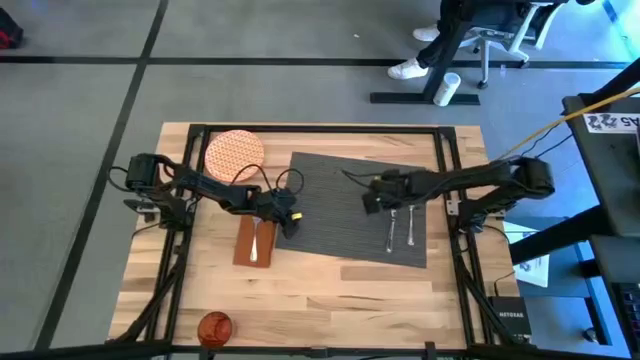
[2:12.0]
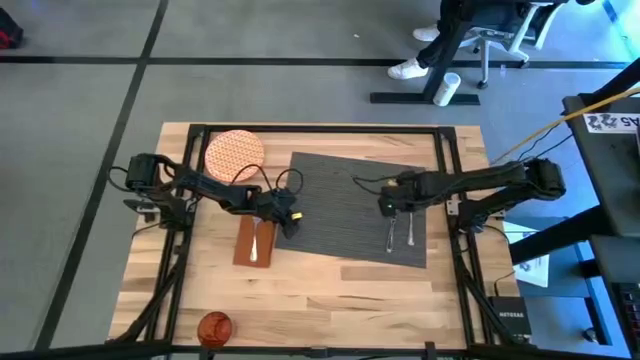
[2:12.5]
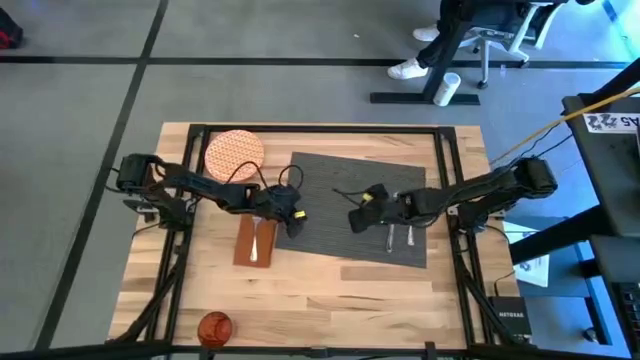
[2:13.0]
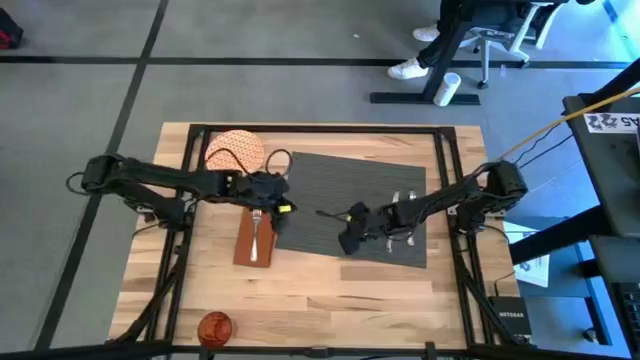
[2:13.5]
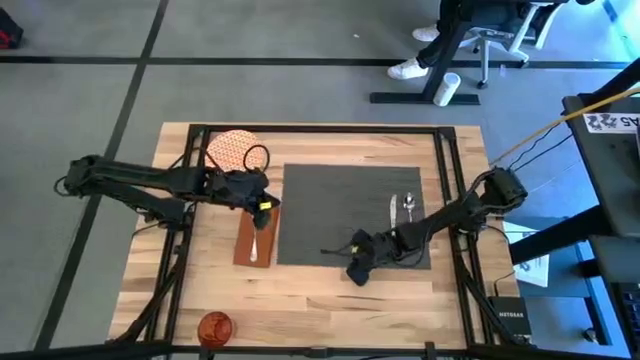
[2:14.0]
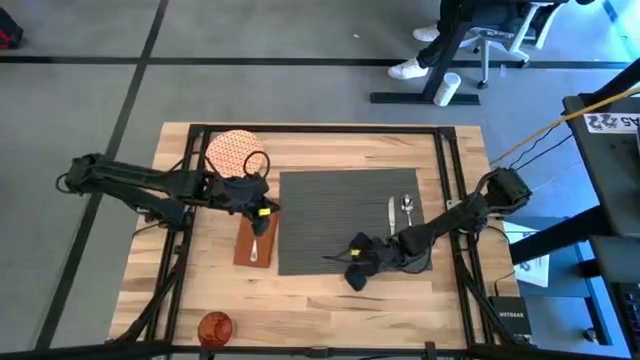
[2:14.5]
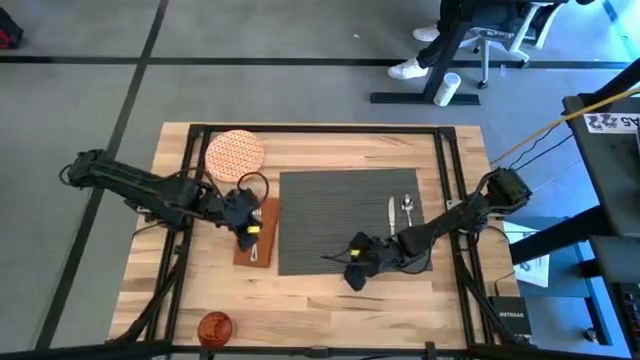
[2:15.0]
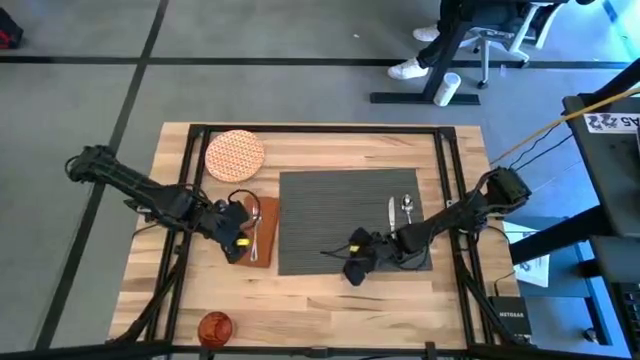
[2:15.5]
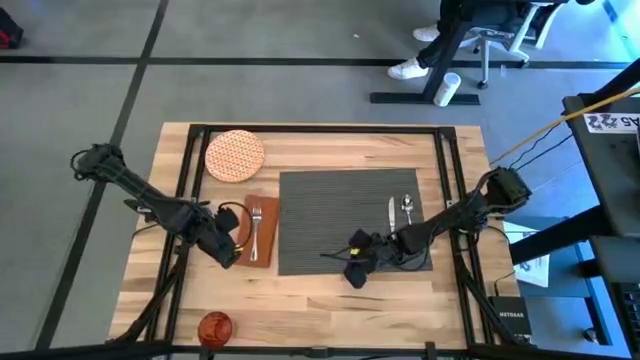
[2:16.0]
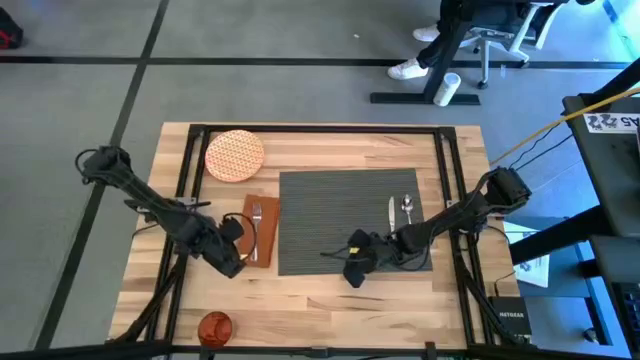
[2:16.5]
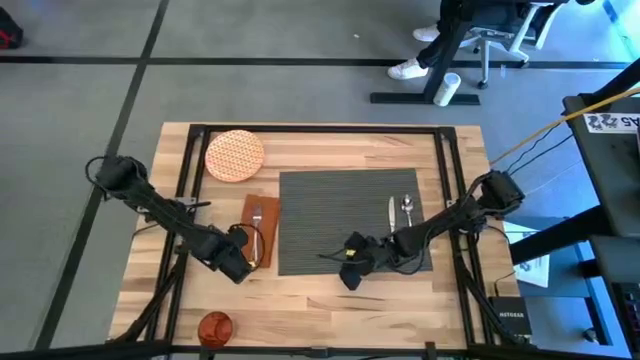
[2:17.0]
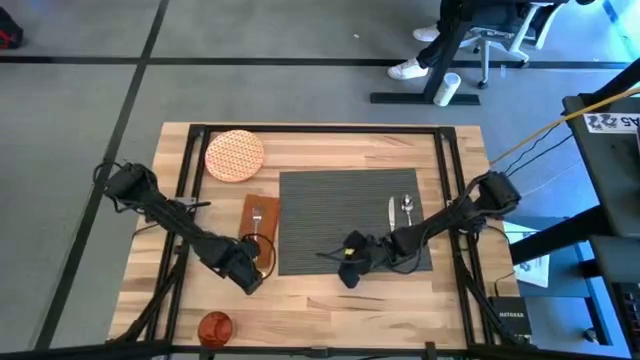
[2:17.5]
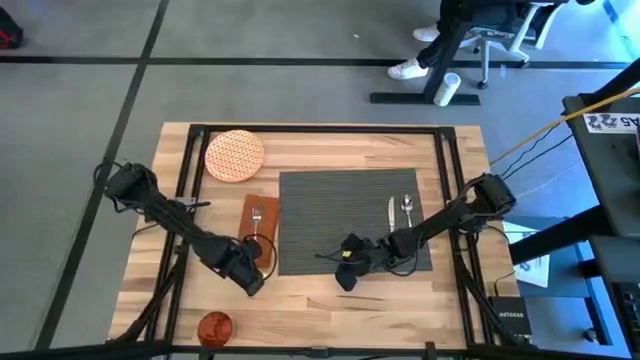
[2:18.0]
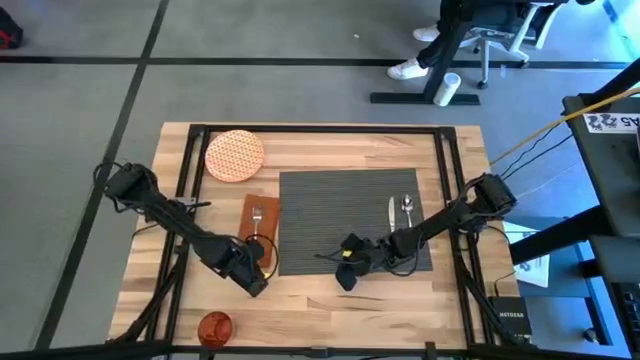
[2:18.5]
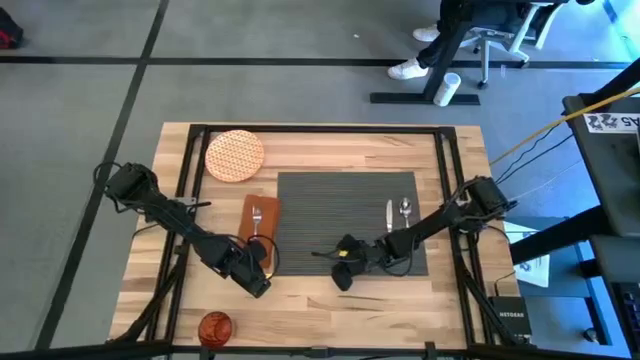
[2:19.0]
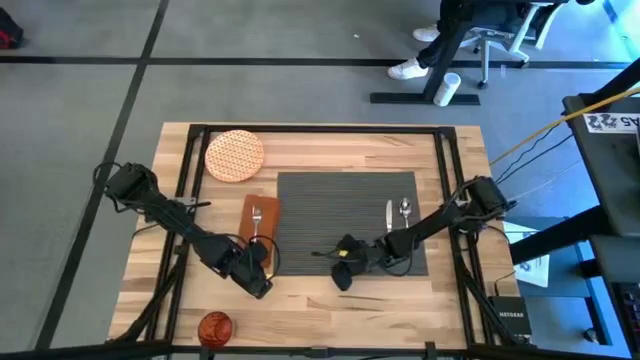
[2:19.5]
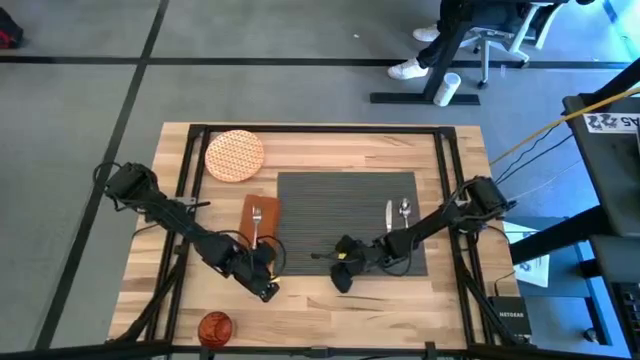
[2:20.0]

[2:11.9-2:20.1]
Task: Set table place
Adjust the gray tablemat

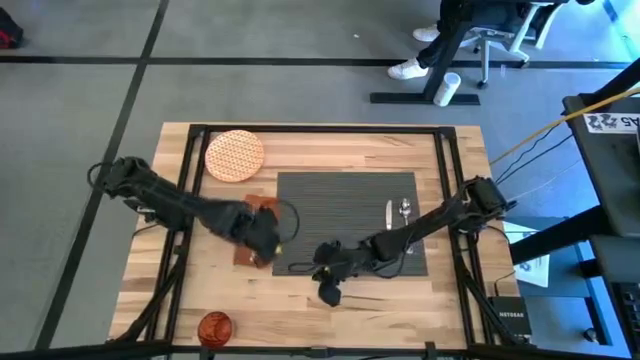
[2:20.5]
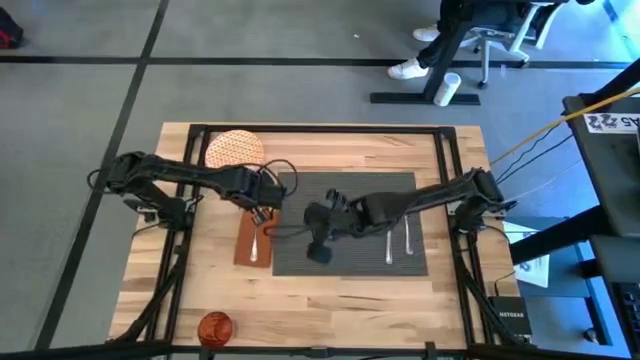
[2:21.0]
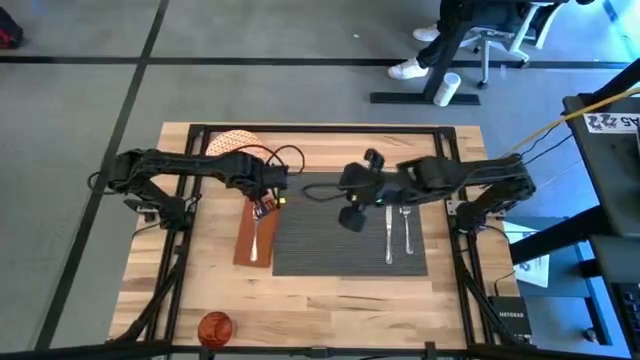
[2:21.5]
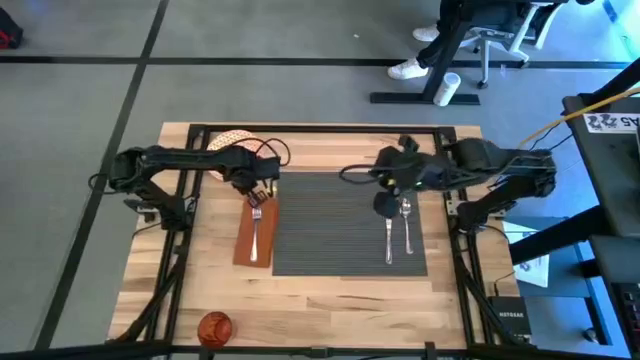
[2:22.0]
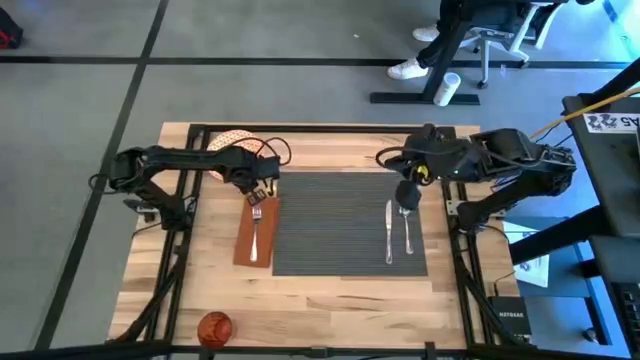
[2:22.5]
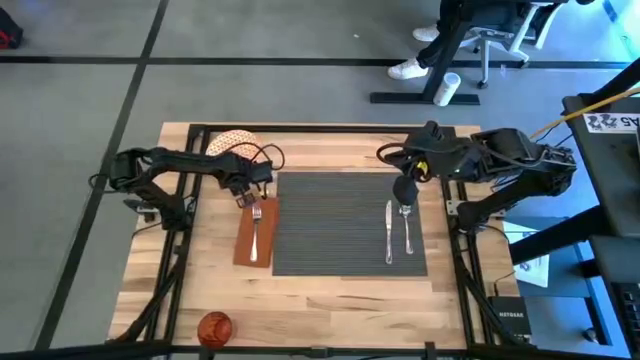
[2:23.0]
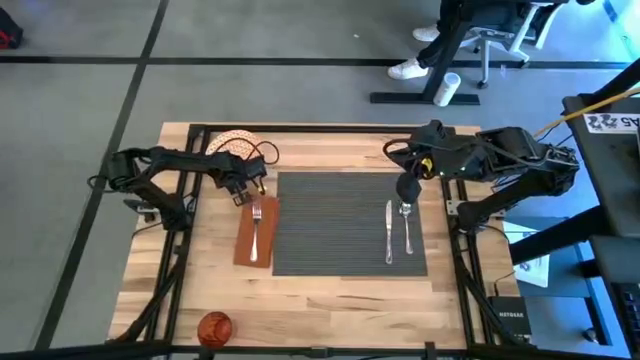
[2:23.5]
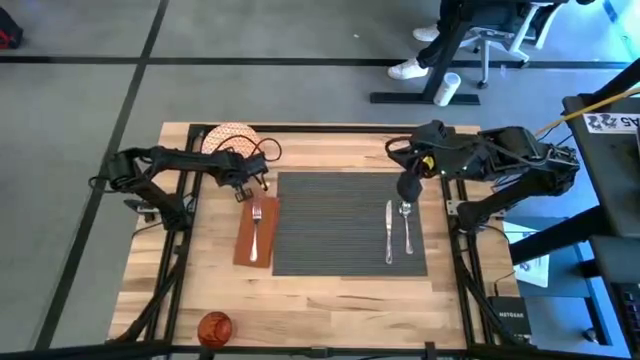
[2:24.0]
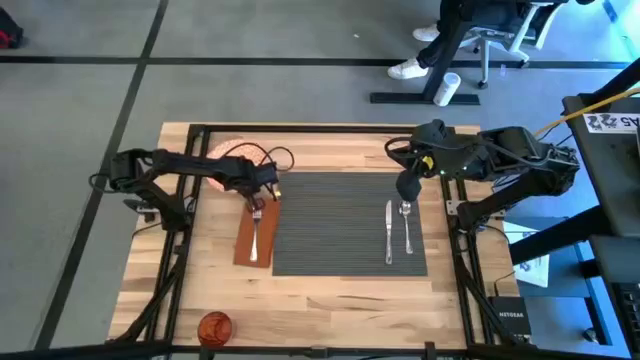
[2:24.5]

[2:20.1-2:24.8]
Put the orange plate on the gray tablemat

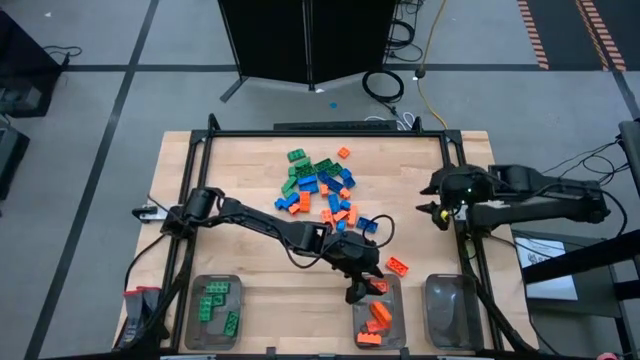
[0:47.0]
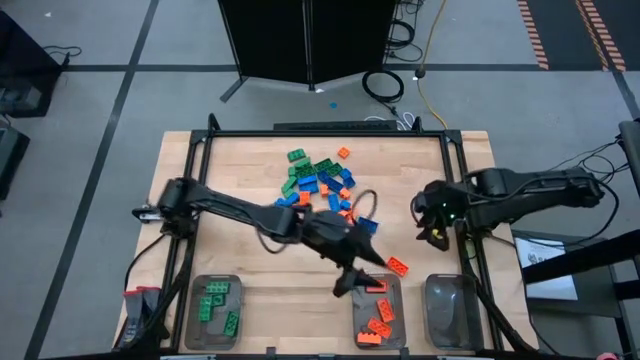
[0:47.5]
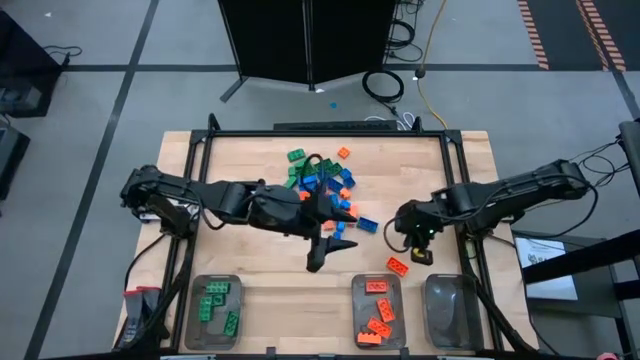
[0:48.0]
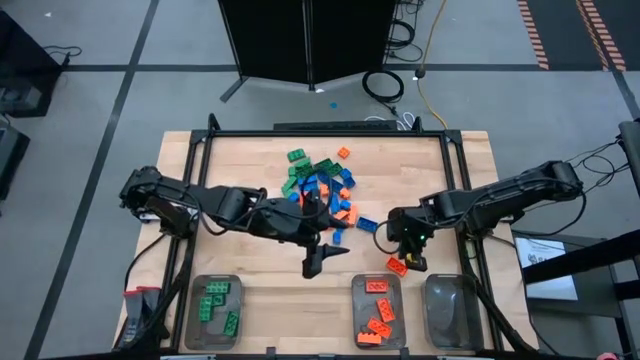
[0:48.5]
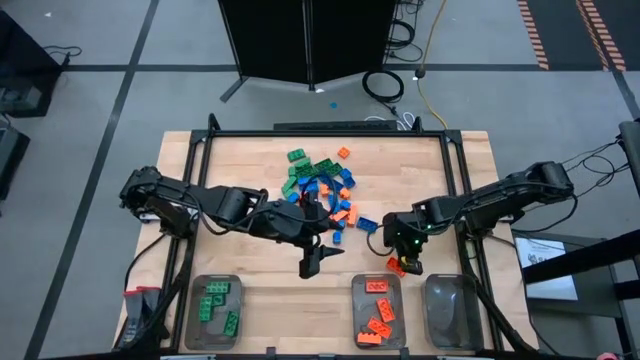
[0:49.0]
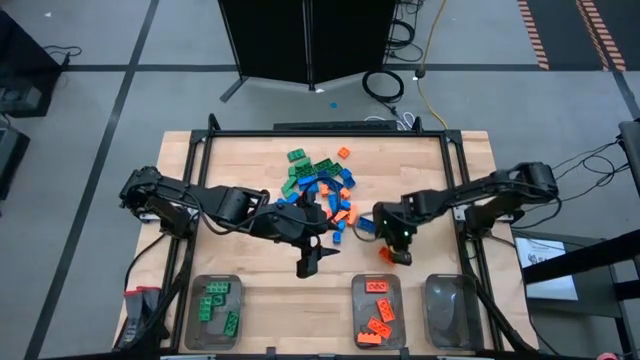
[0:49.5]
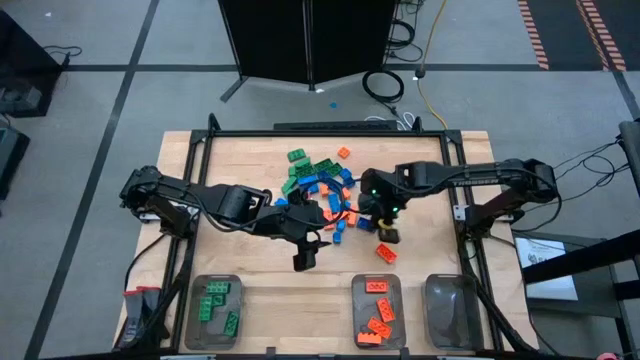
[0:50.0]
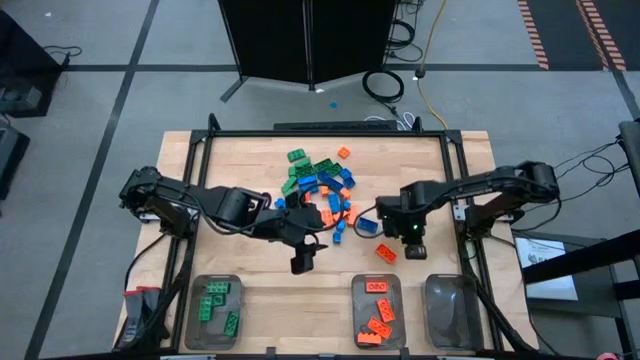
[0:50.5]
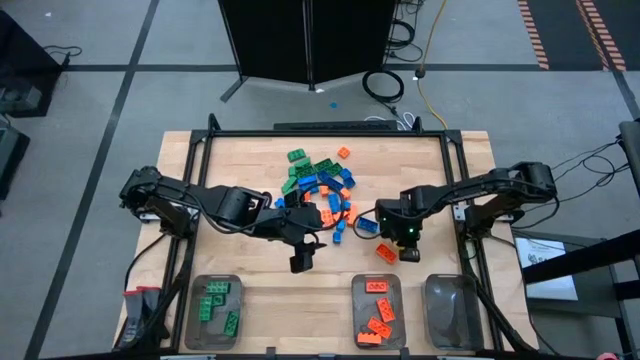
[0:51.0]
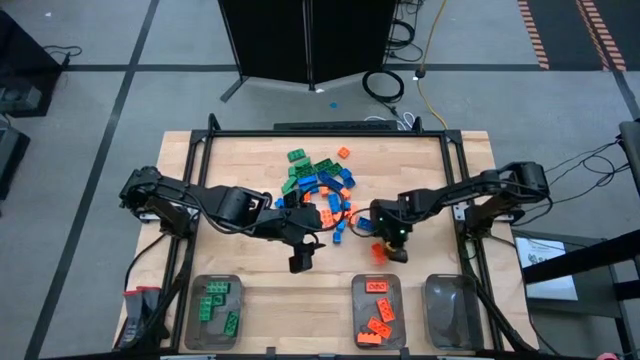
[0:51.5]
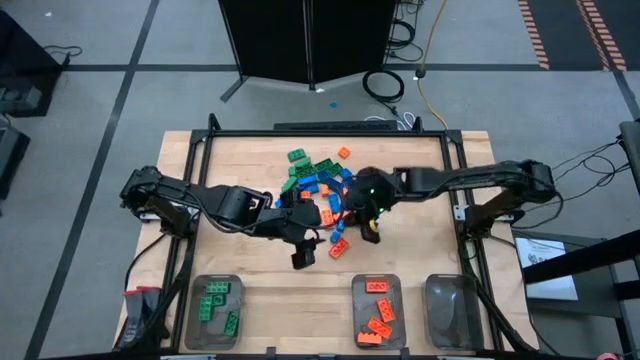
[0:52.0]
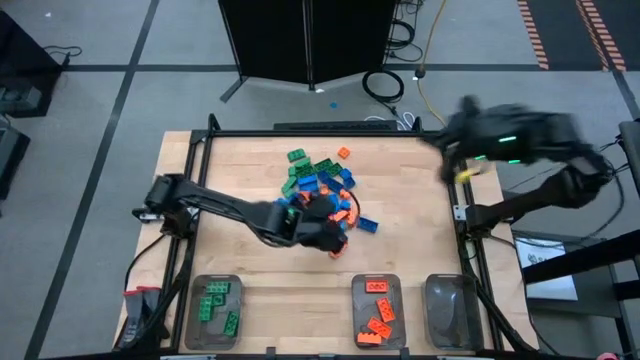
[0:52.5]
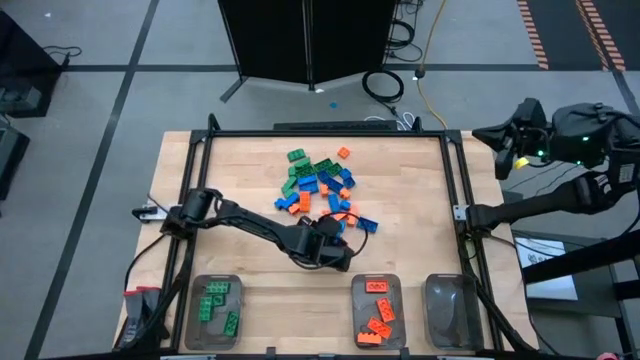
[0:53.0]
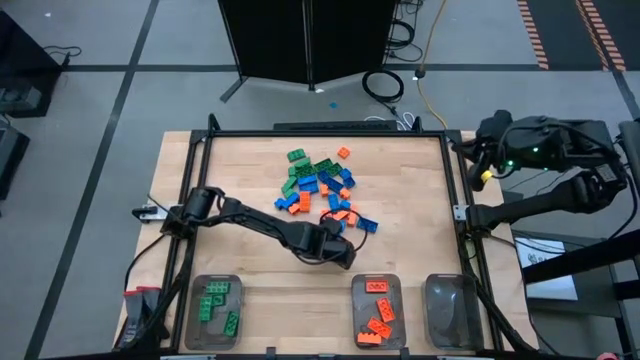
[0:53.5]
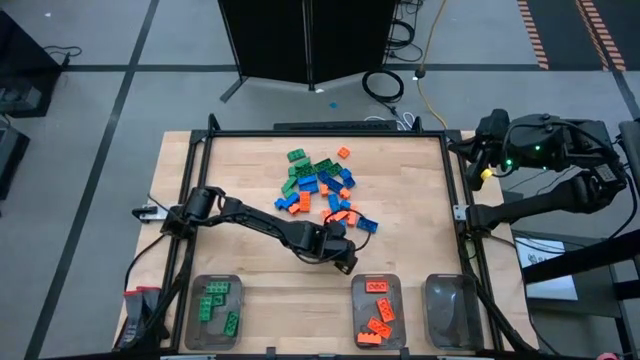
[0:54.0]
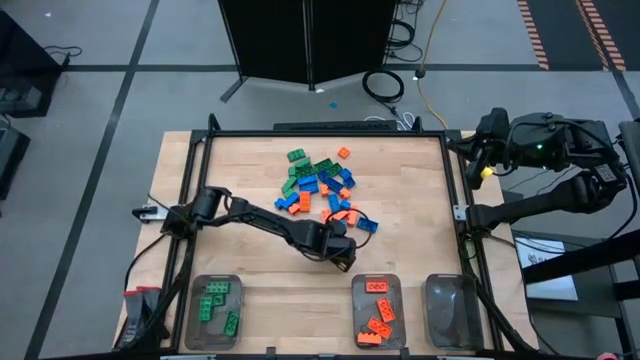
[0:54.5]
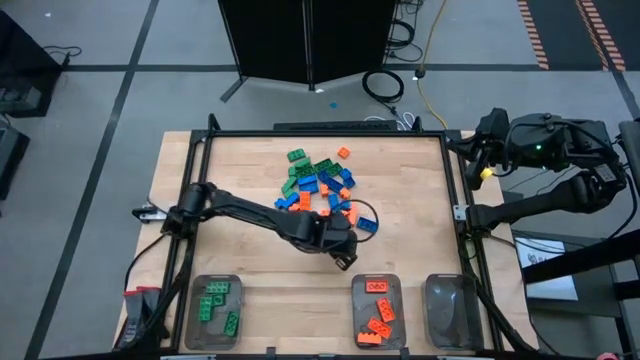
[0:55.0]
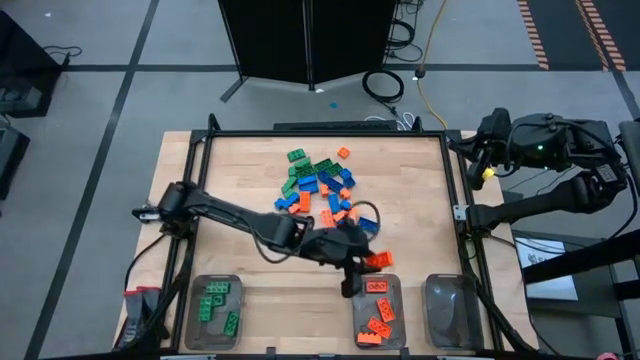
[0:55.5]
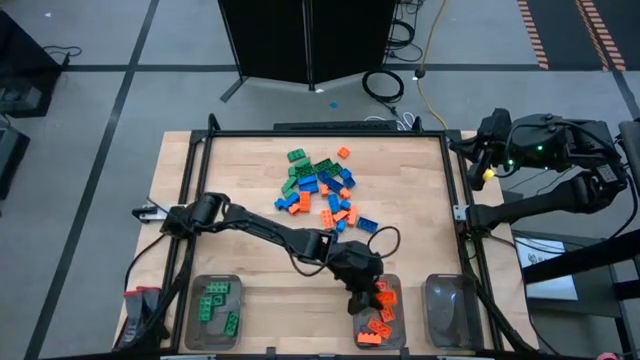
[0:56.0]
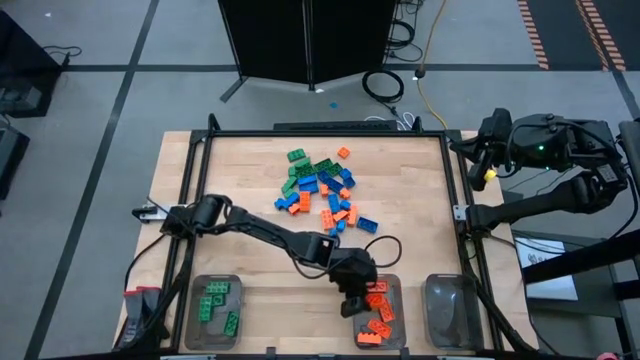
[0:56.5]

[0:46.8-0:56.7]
Task: Sort blocks
Put the orange game piece into the center black bin
